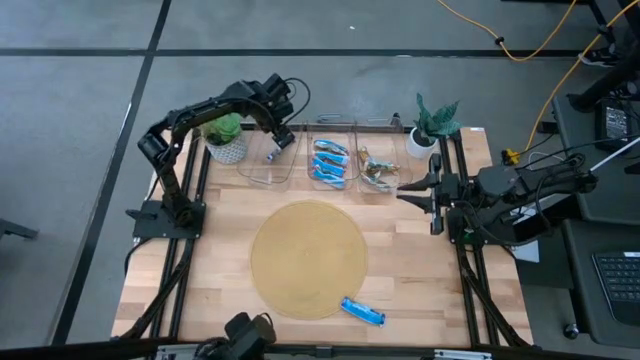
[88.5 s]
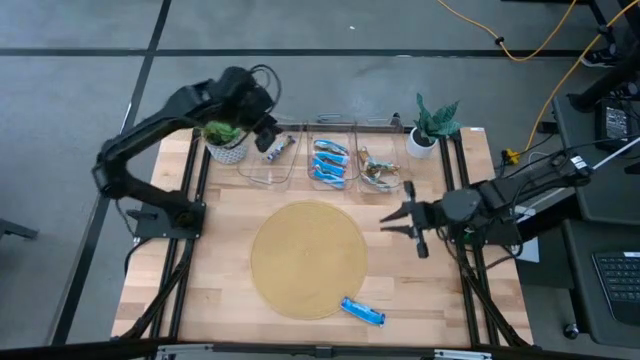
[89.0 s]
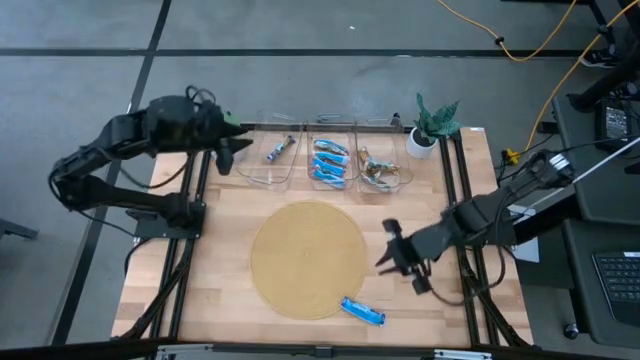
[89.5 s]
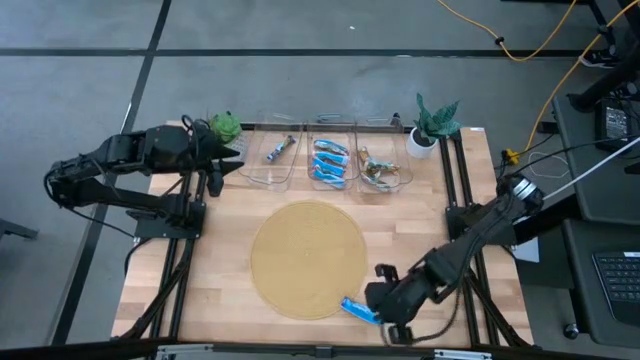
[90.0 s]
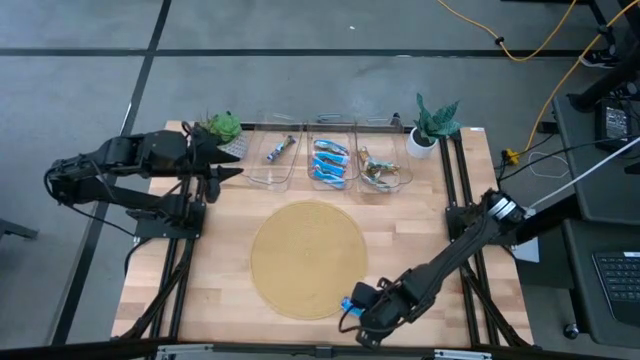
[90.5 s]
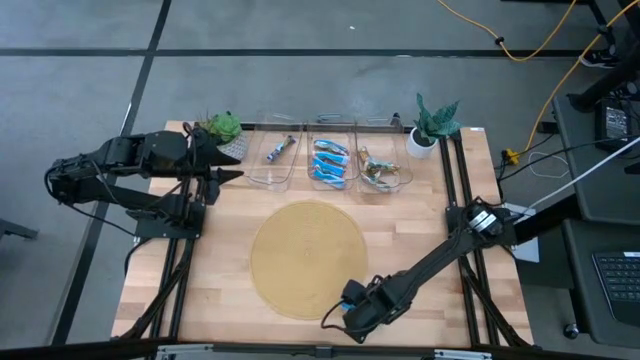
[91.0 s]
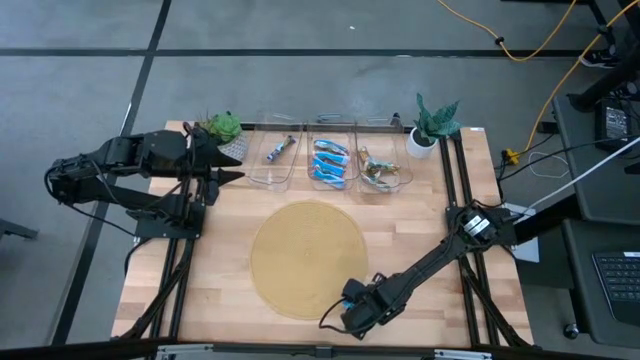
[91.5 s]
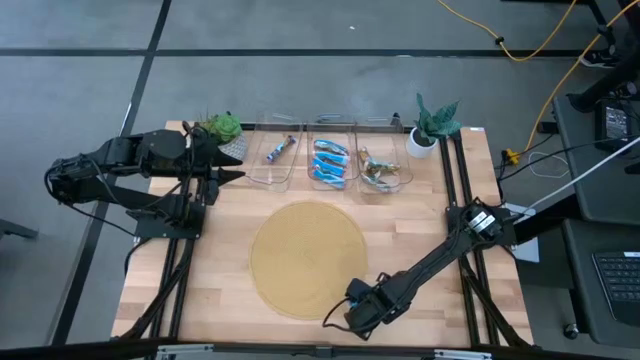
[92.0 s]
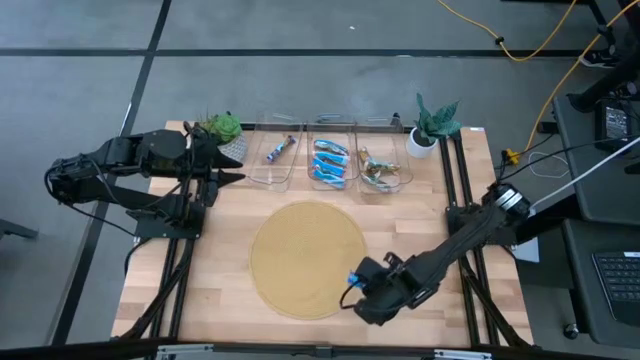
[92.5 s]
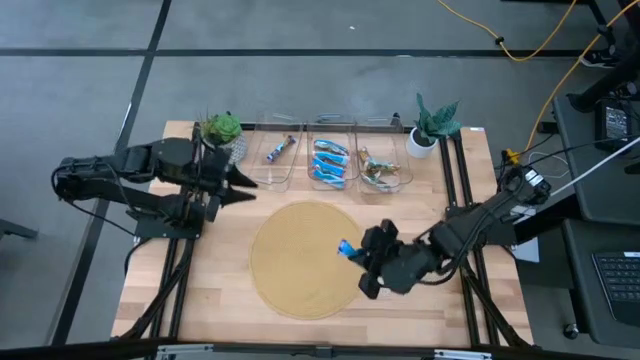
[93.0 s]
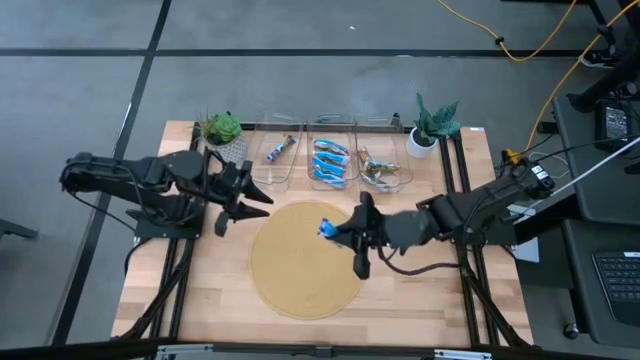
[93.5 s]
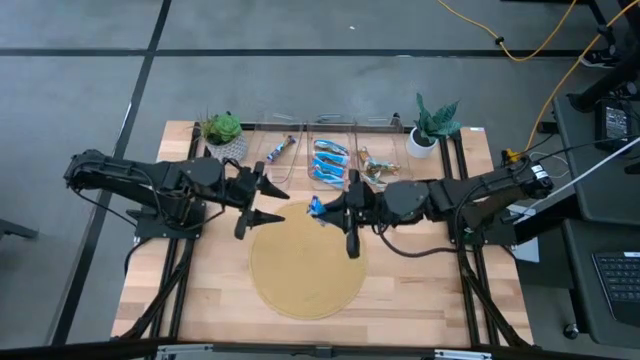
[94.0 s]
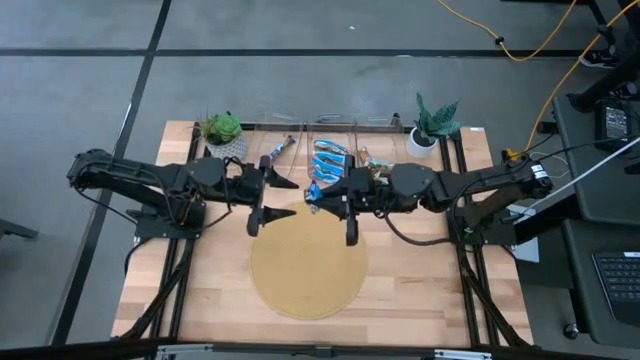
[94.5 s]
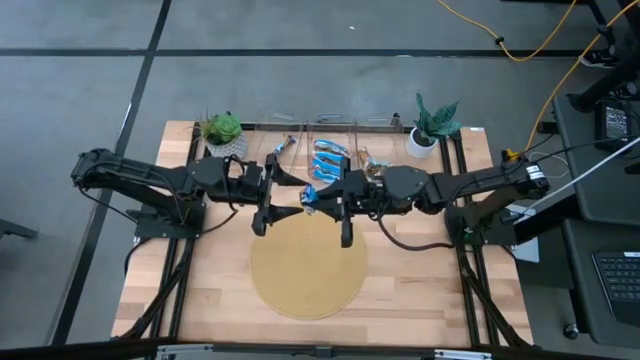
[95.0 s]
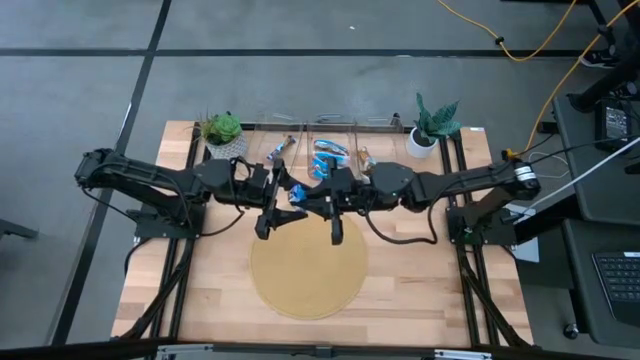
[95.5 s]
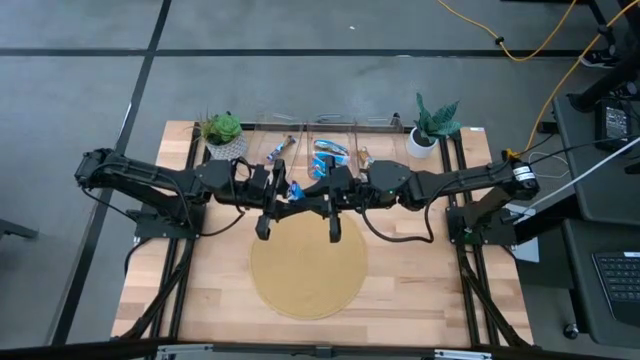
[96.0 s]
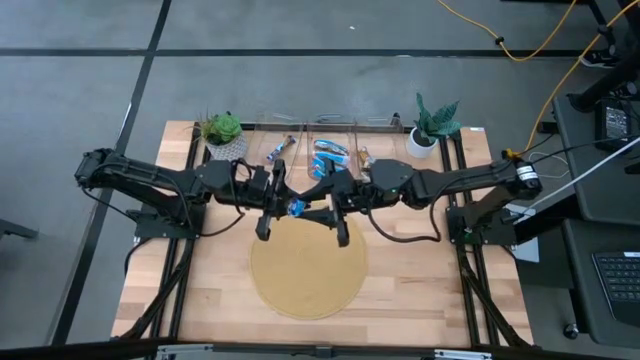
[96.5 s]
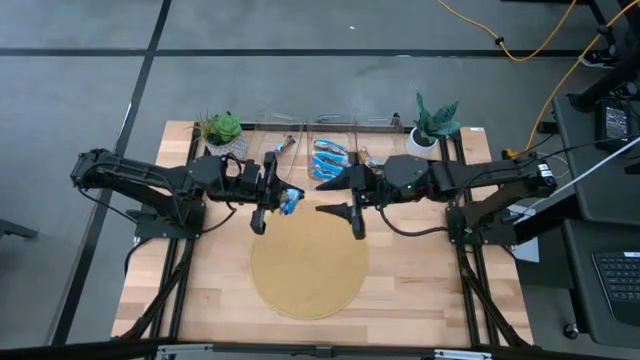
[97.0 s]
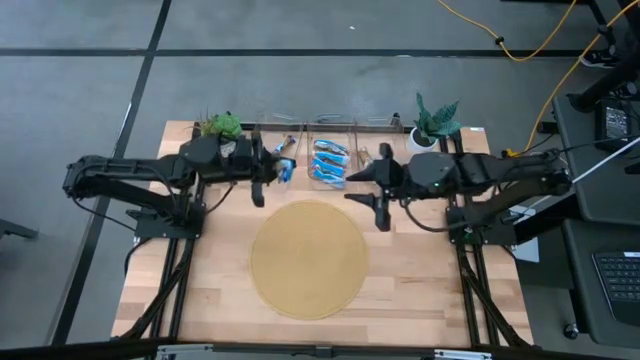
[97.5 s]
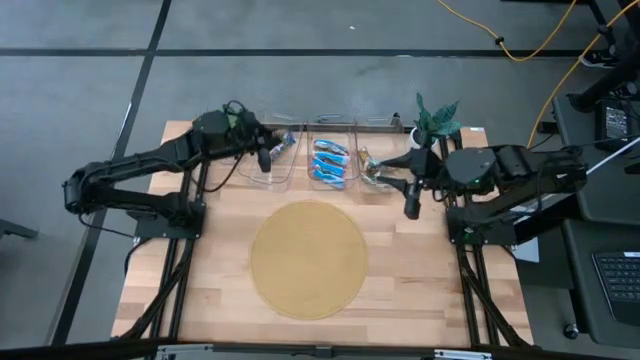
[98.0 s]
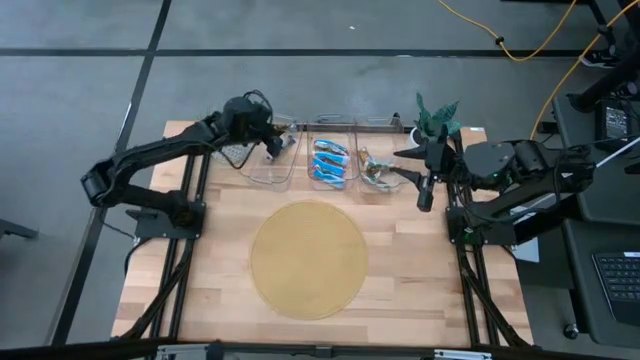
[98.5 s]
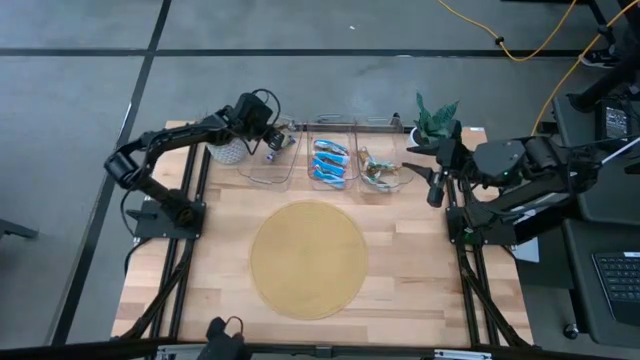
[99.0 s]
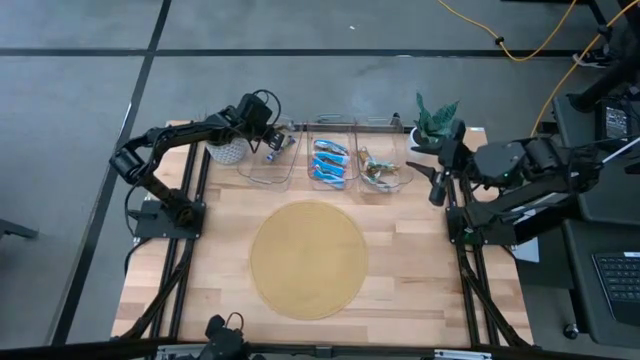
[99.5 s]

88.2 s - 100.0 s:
Task: Pick and place Granola Bars by type
Put the blue granola bar into the left transparent bin

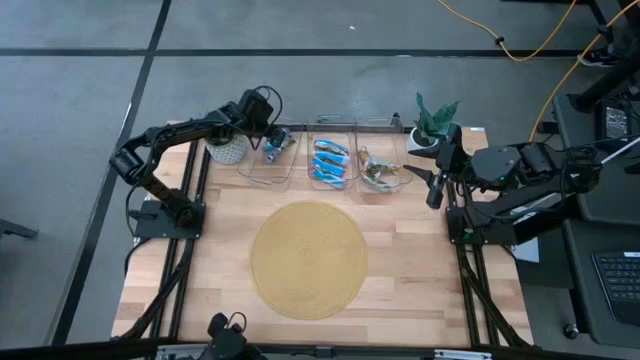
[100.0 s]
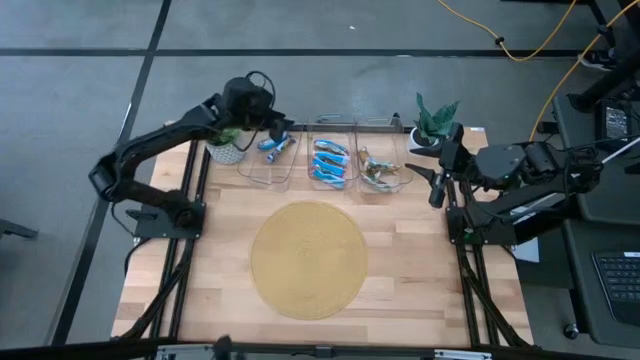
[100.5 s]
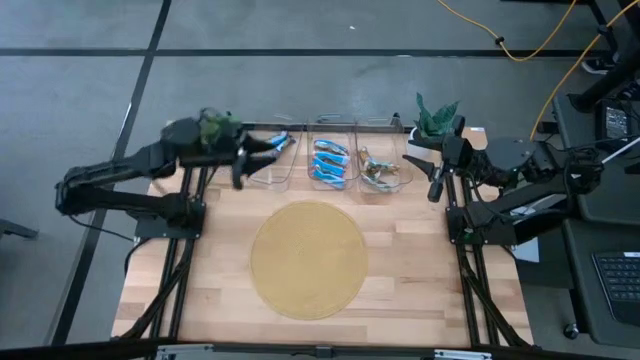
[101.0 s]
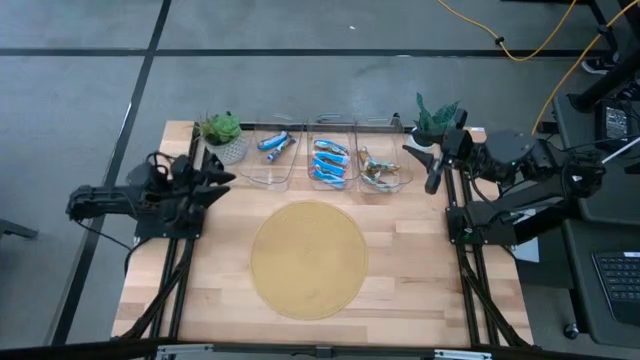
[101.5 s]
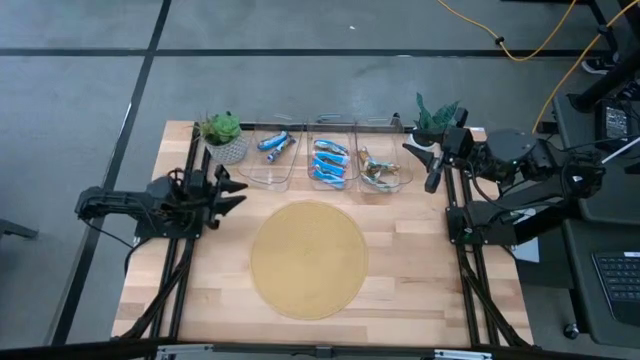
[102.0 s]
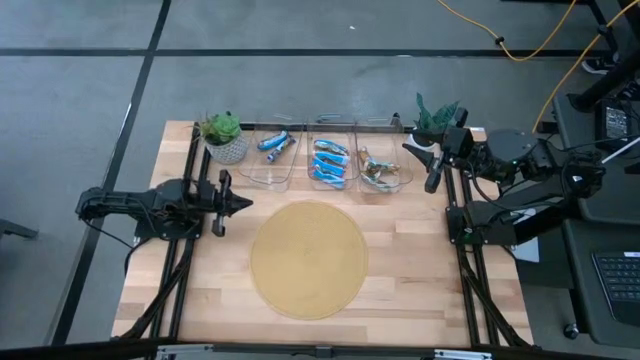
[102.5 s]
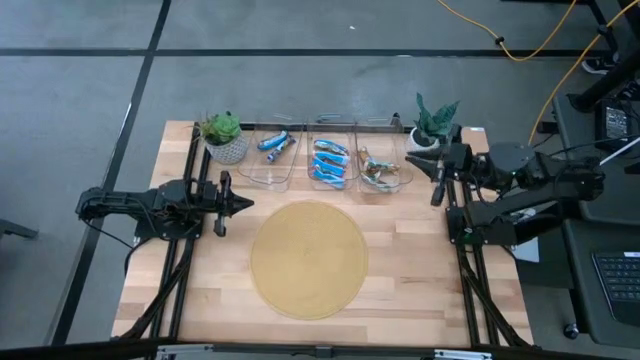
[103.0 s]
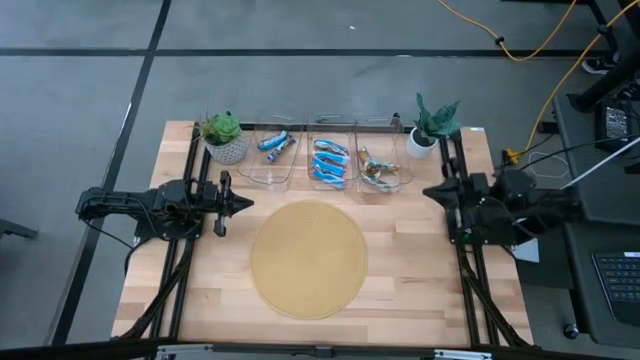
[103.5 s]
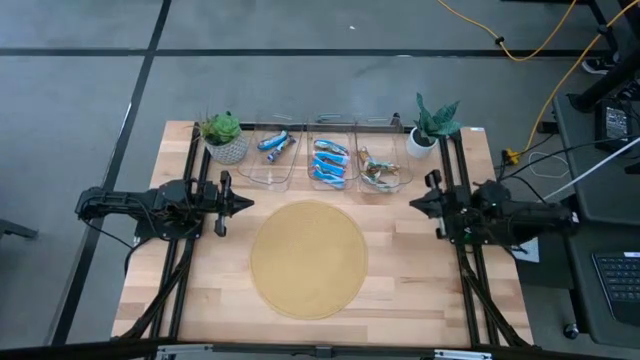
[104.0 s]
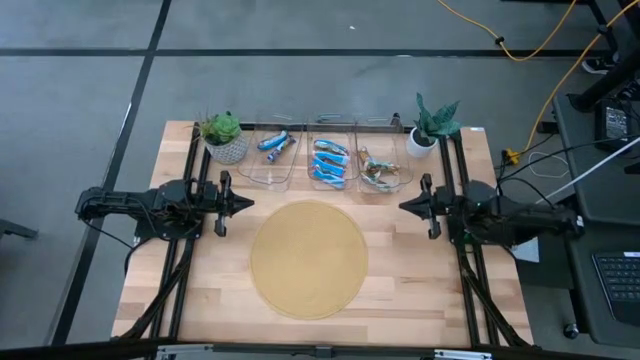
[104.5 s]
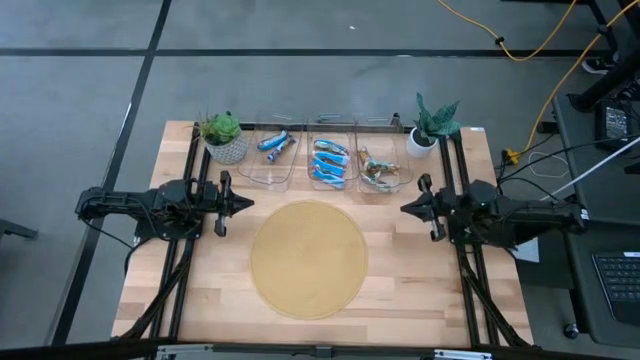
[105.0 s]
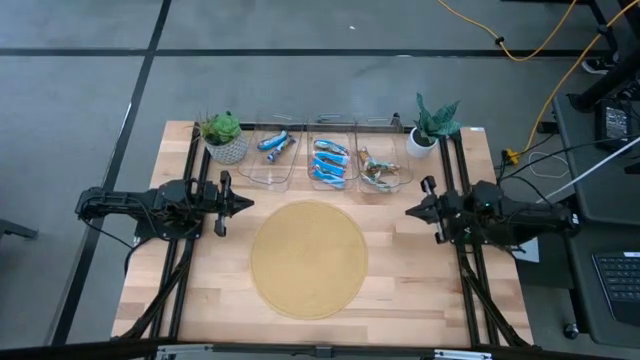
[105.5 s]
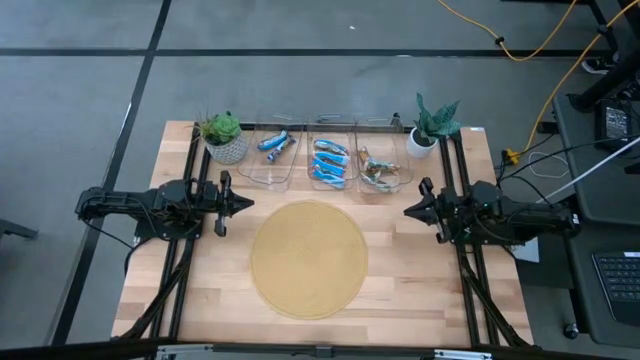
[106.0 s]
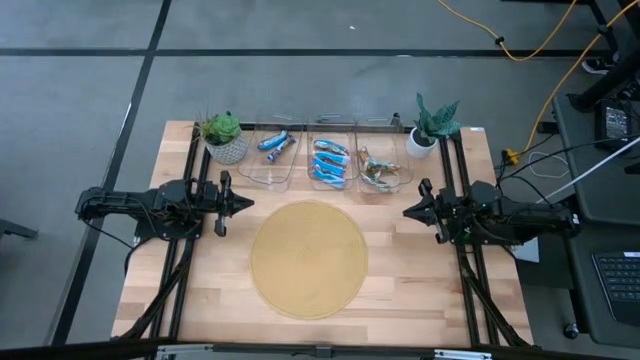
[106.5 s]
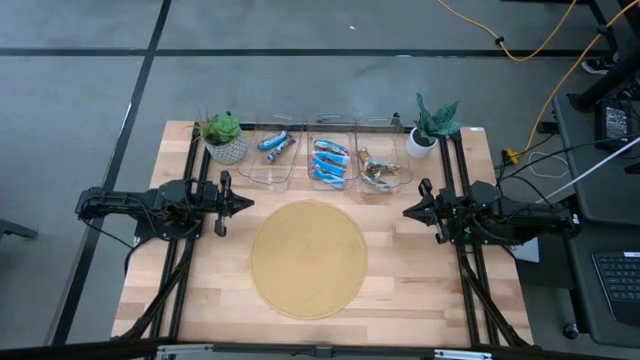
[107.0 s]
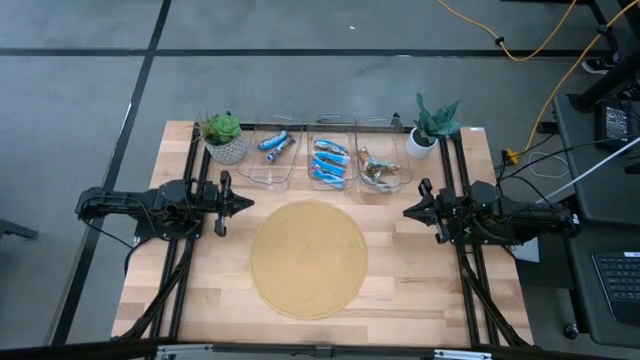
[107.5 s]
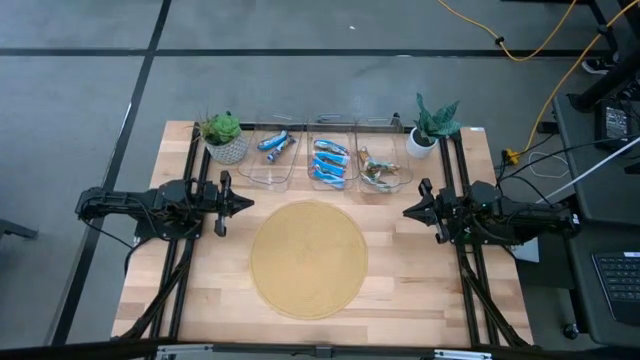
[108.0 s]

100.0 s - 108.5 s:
Return to Home Position
